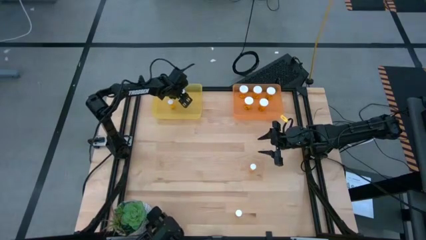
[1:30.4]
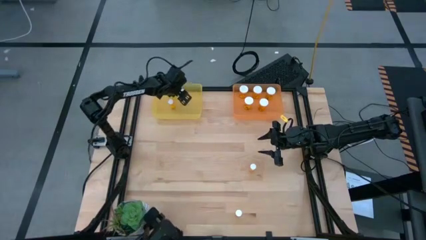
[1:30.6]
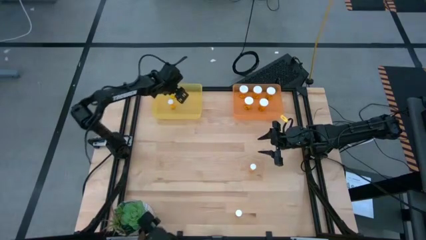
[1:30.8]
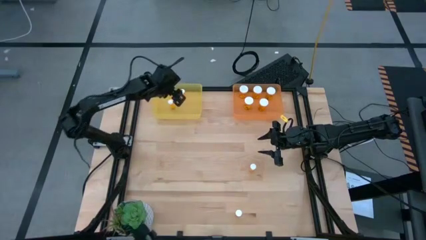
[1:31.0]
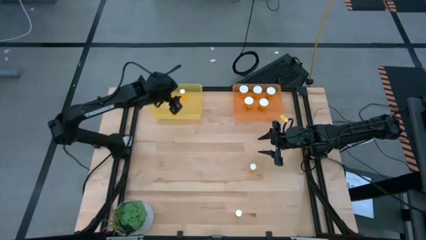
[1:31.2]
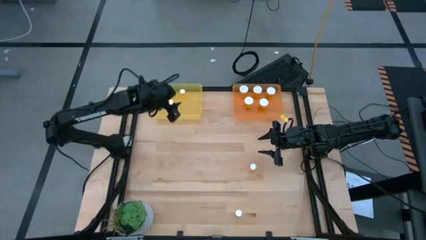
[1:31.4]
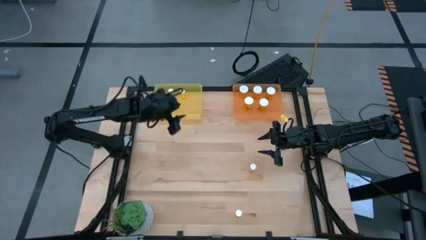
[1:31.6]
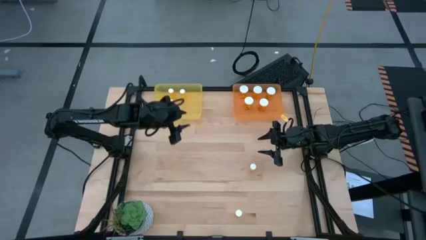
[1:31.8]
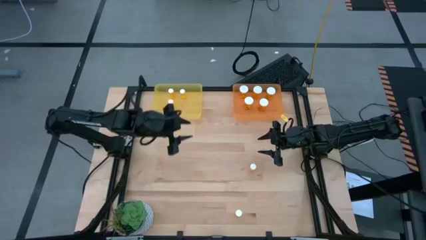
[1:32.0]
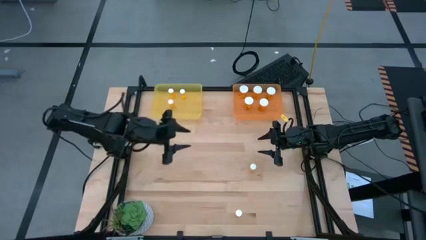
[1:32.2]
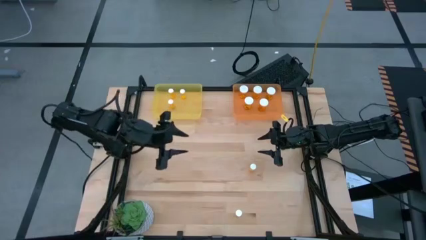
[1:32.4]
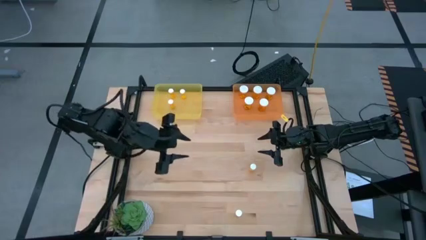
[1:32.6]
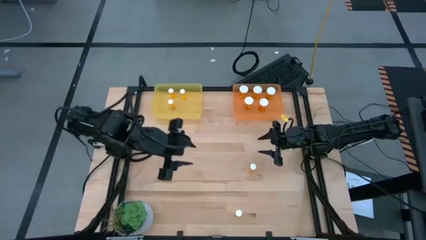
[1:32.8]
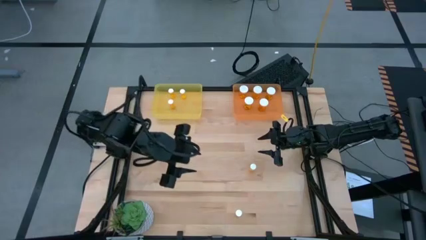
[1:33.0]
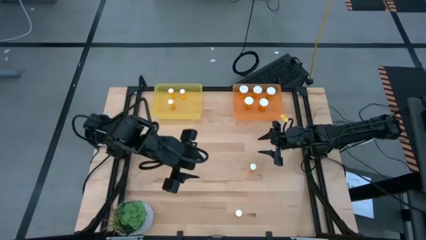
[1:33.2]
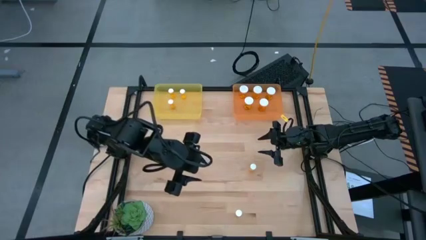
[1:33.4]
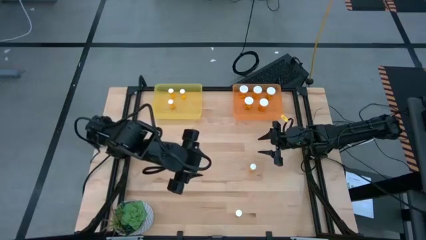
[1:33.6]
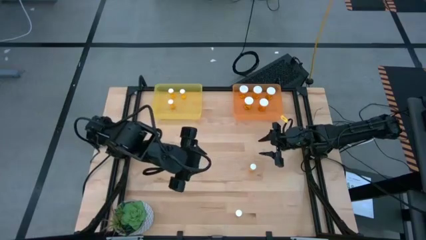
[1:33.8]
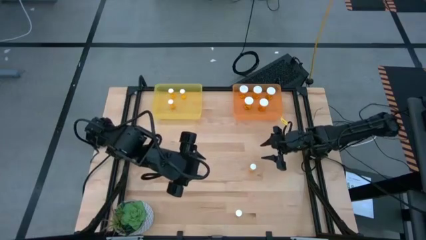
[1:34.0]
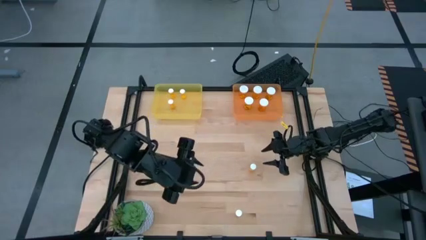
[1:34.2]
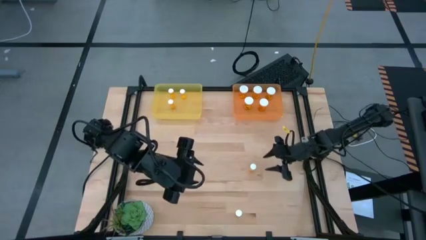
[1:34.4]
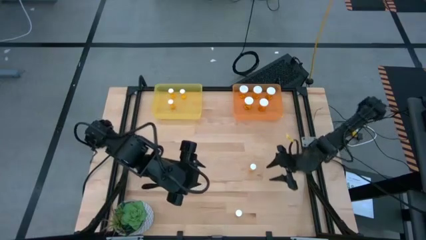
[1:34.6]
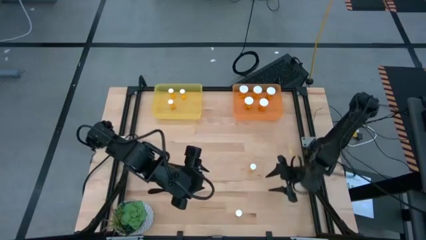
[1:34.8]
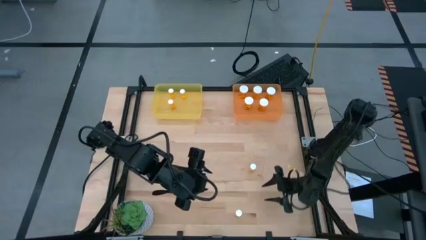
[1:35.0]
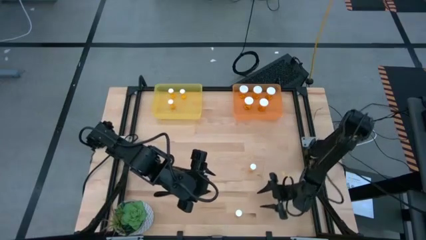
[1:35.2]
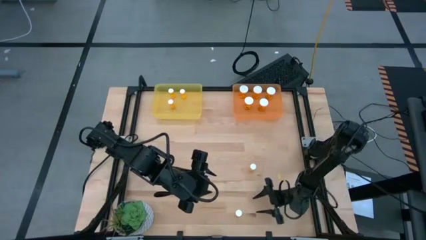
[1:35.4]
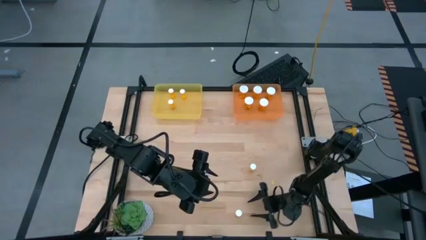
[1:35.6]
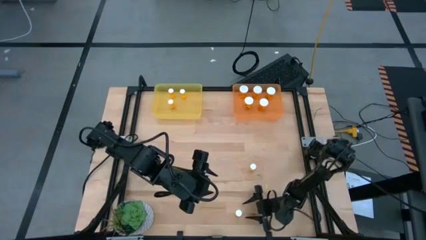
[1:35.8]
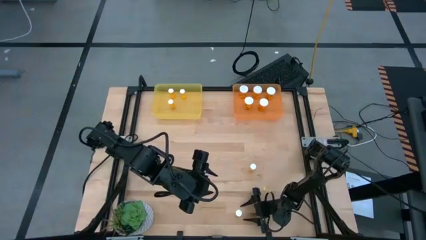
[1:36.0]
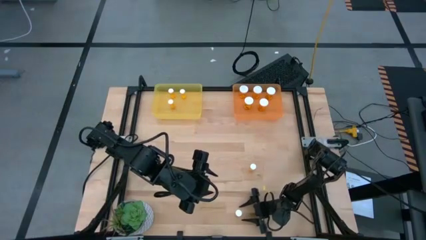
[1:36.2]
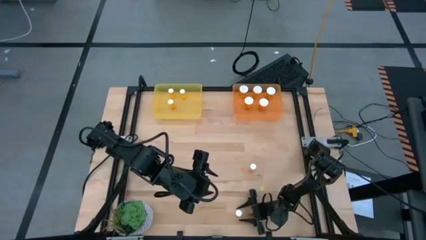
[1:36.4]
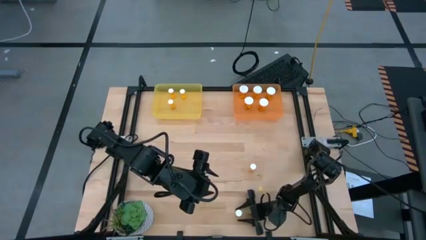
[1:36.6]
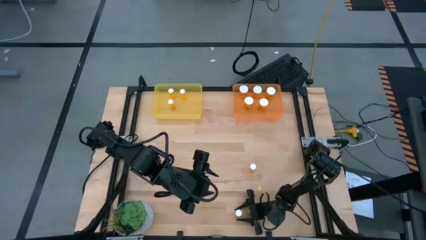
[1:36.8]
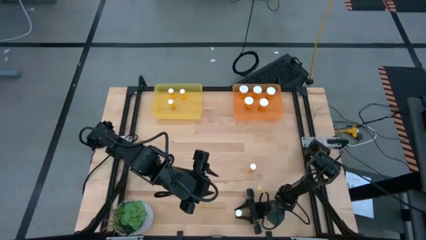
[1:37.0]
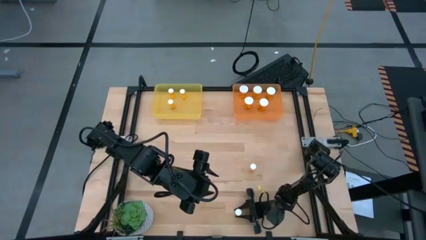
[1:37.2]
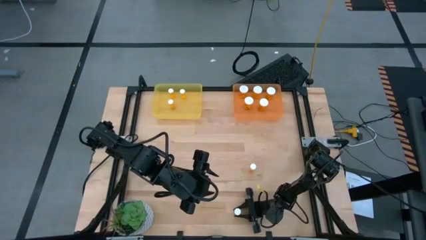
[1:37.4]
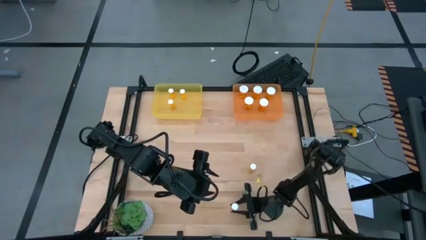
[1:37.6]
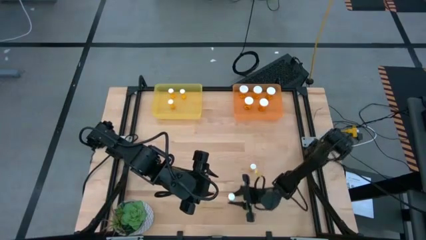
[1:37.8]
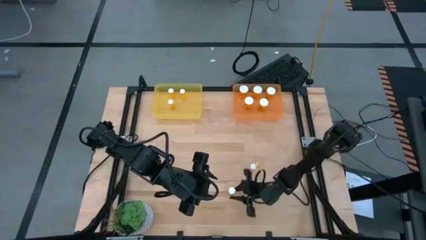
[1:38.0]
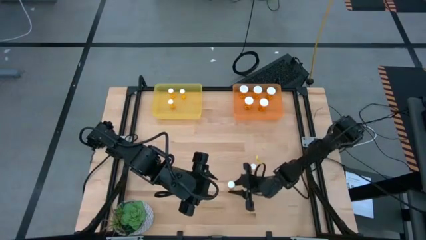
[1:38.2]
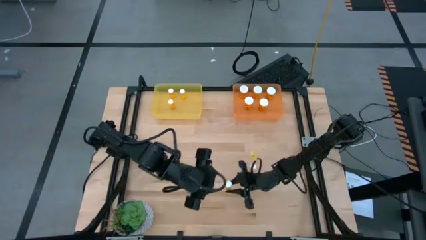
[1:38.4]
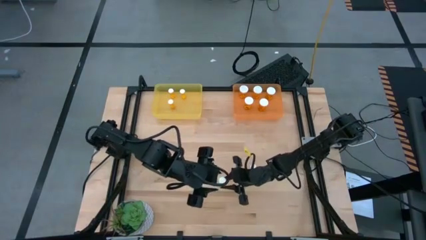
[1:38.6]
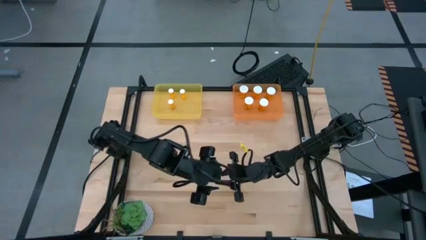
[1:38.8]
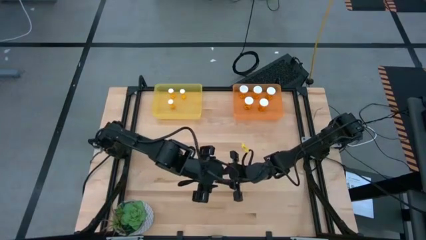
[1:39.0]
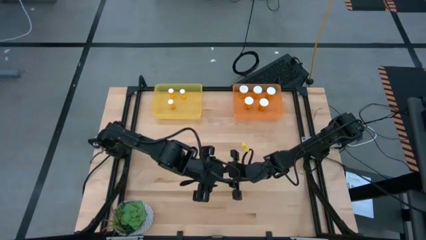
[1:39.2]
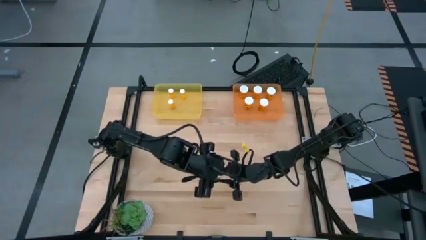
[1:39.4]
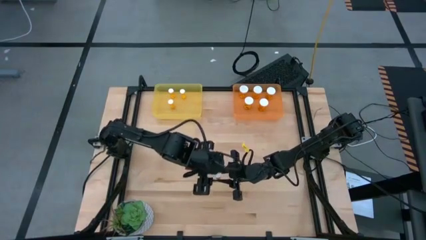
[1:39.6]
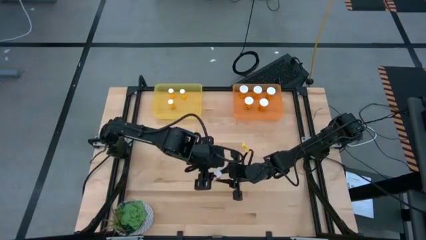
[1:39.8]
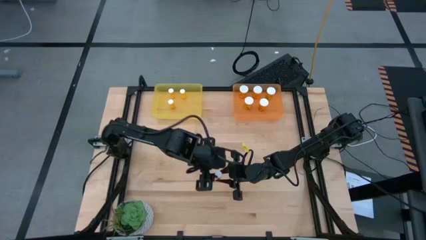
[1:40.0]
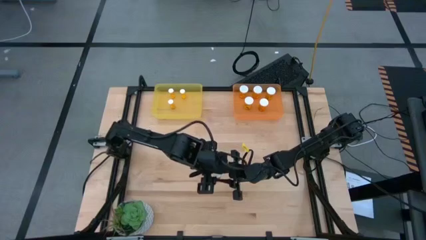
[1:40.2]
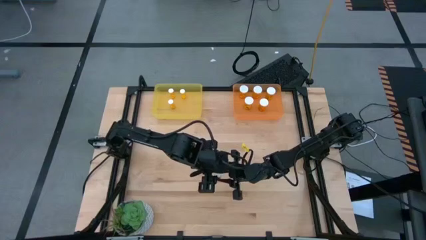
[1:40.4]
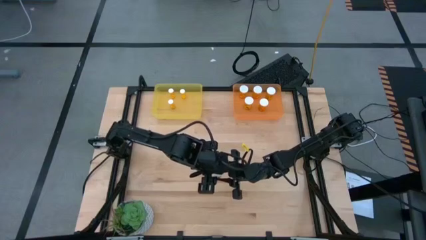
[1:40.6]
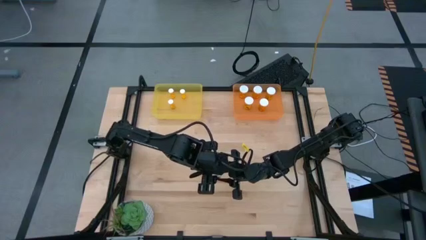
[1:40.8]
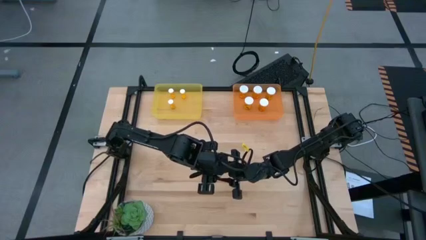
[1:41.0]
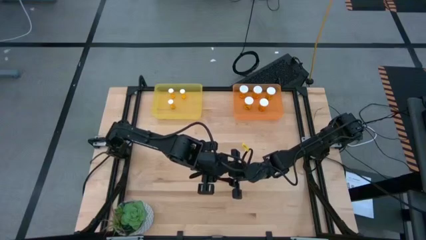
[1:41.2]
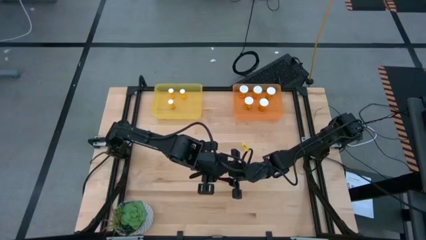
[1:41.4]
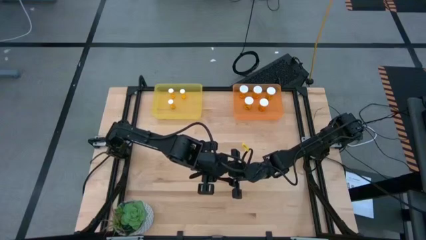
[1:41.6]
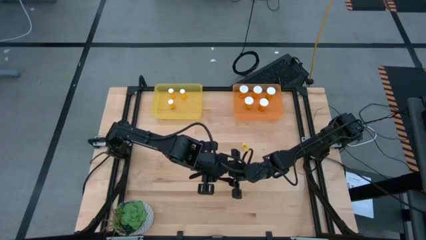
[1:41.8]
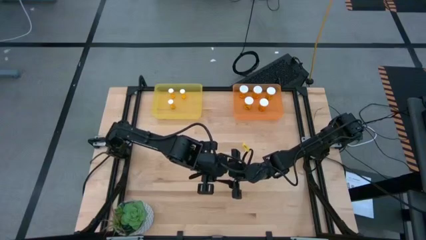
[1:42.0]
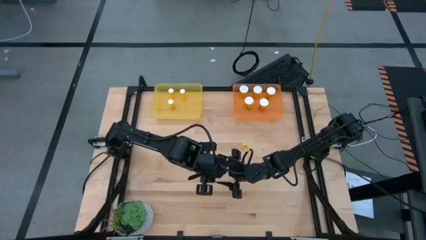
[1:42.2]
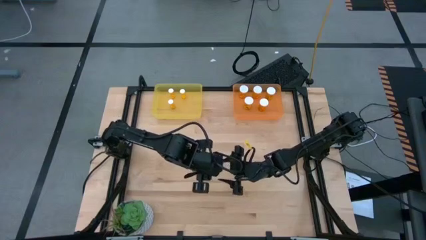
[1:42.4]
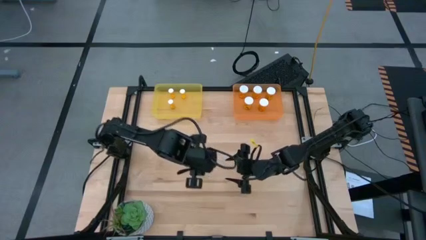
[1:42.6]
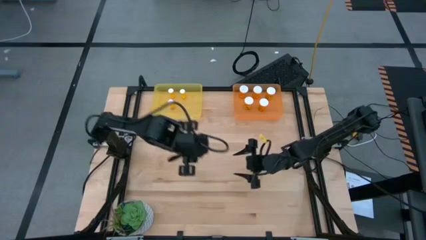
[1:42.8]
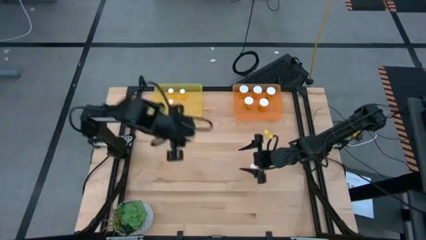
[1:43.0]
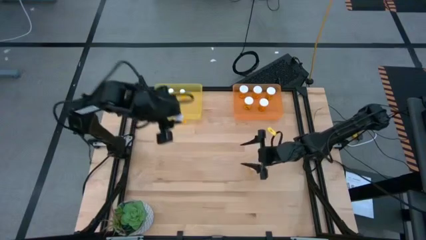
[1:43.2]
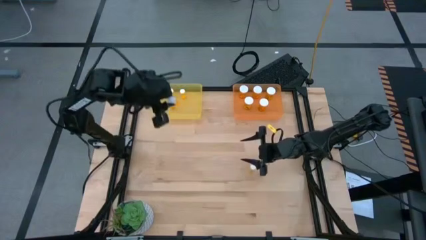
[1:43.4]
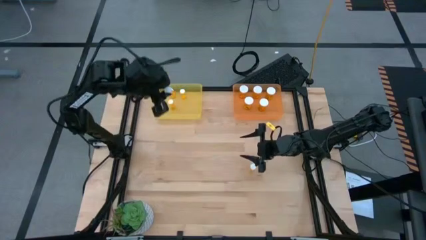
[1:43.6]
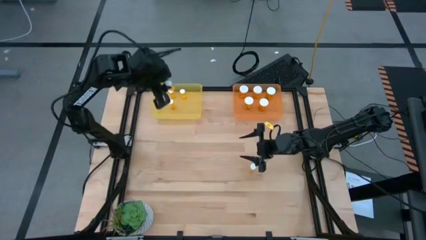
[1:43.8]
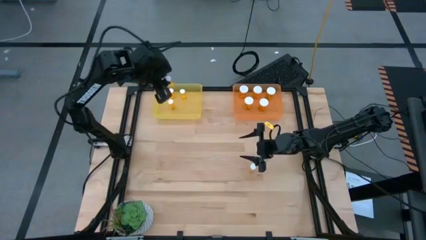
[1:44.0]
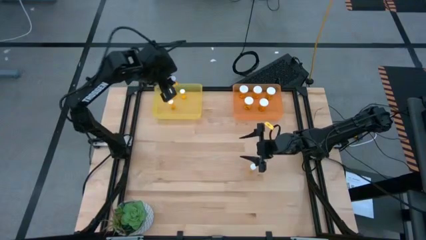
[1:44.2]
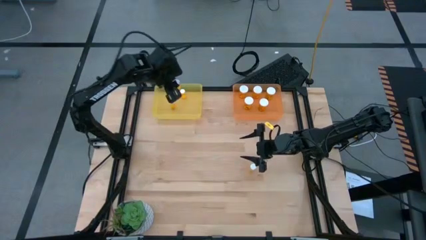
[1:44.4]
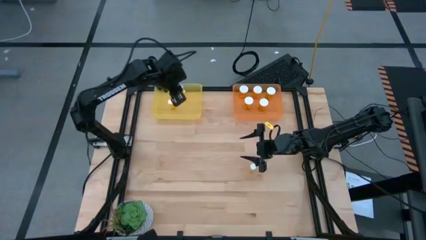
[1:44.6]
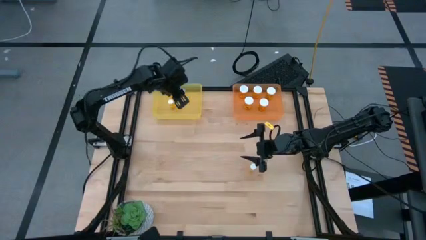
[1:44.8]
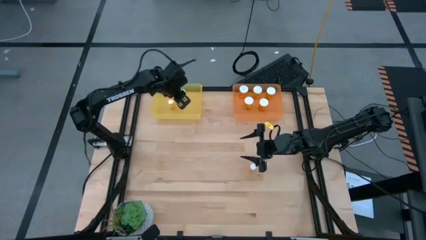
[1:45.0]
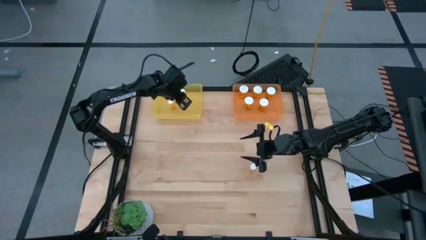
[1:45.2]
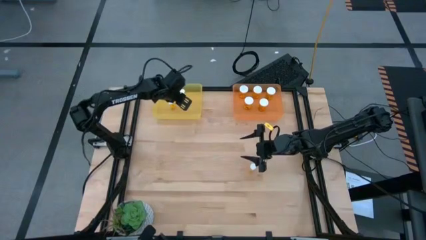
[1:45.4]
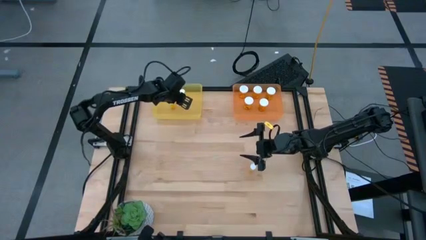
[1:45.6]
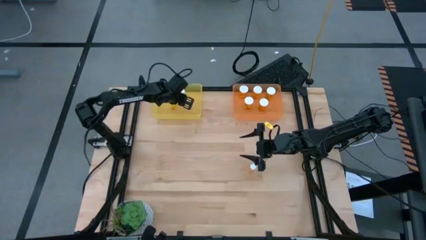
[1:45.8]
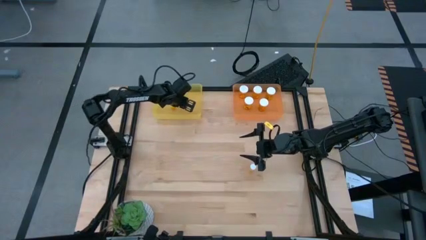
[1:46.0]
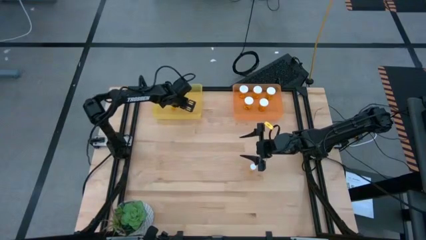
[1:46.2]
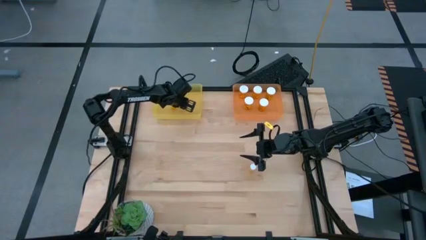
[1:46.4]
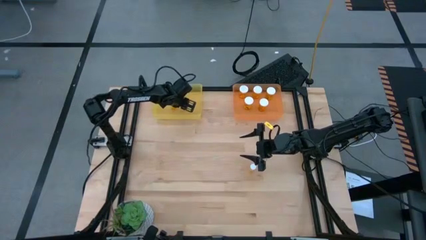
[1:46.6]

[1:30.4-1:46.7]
Task: Pick and place medicine bottles into bin by pill shape (circle, oval)
Put the small yellow pill bottle into the transparent yellow bin
